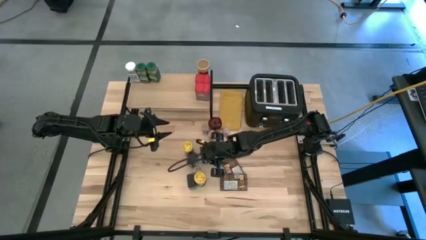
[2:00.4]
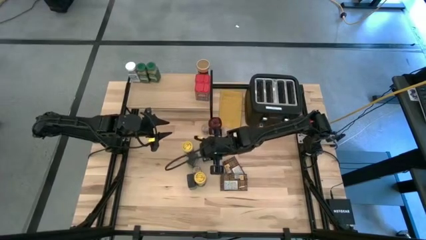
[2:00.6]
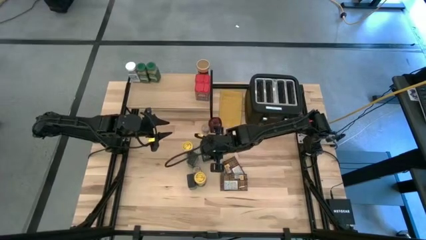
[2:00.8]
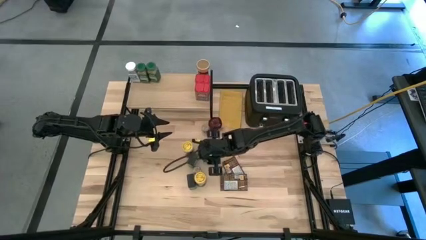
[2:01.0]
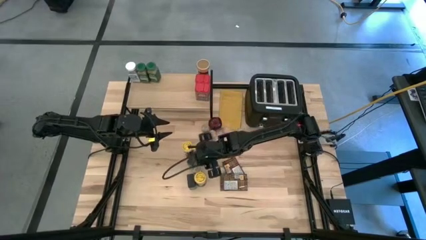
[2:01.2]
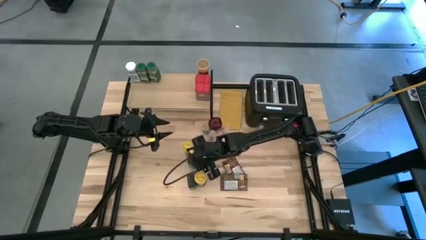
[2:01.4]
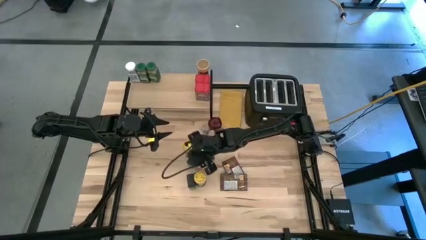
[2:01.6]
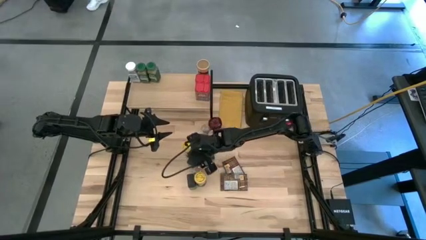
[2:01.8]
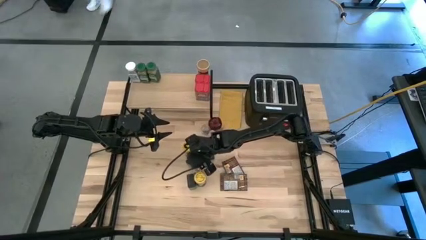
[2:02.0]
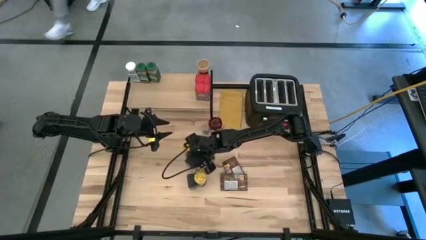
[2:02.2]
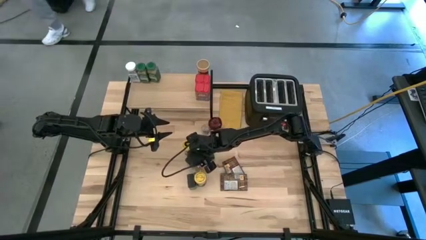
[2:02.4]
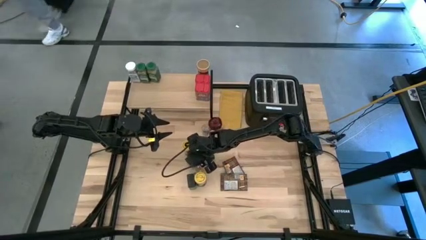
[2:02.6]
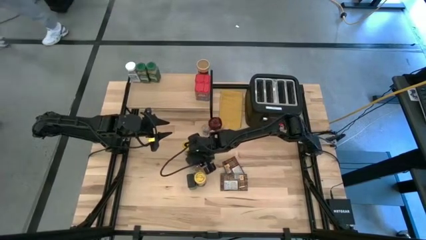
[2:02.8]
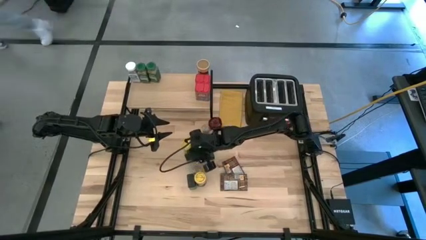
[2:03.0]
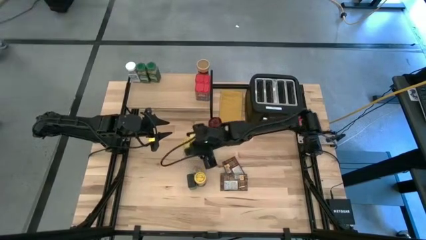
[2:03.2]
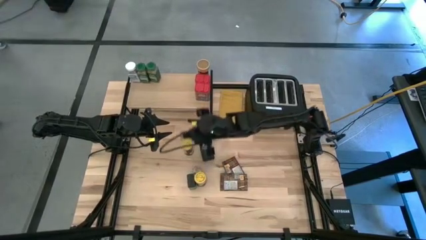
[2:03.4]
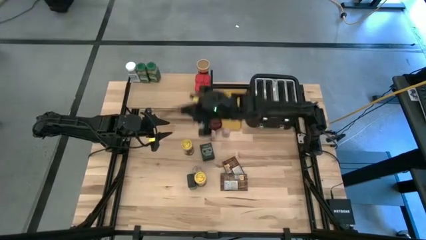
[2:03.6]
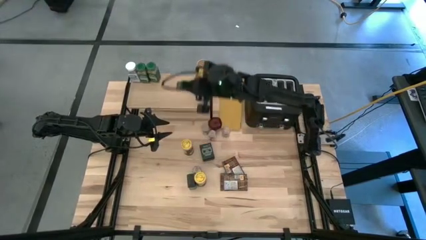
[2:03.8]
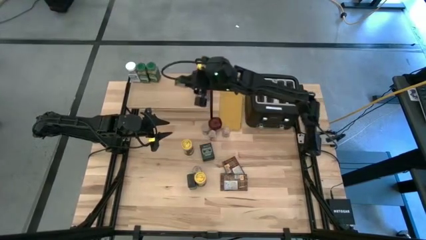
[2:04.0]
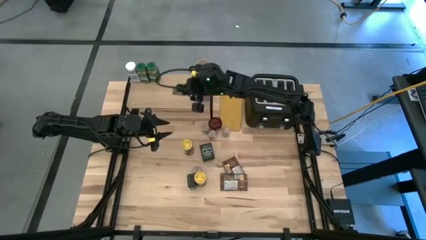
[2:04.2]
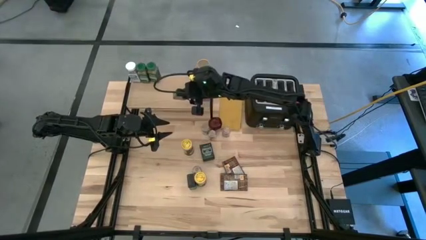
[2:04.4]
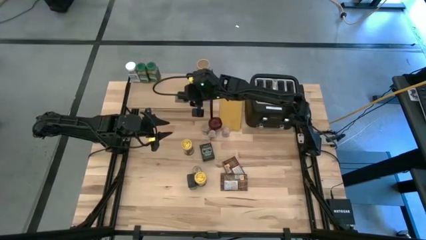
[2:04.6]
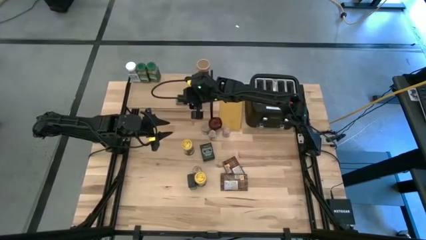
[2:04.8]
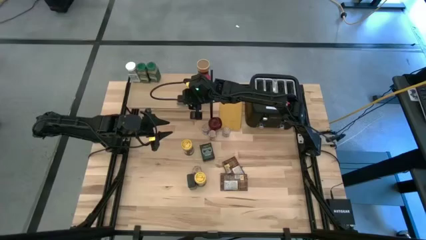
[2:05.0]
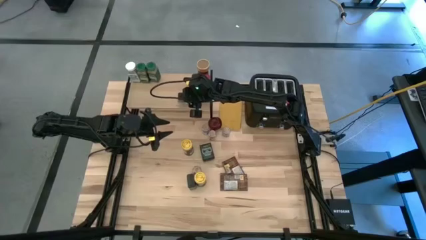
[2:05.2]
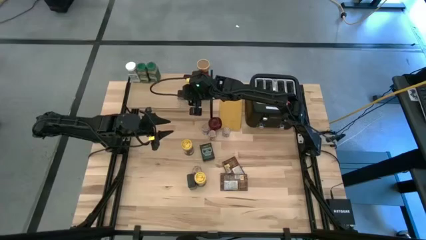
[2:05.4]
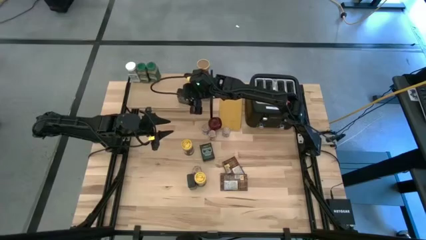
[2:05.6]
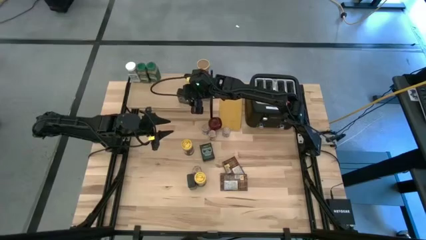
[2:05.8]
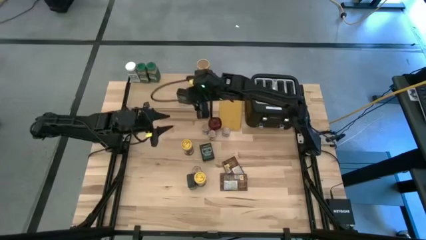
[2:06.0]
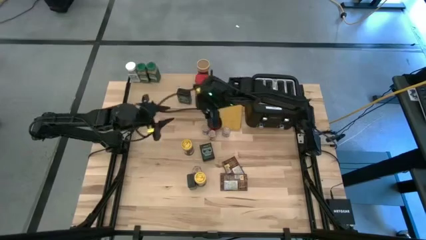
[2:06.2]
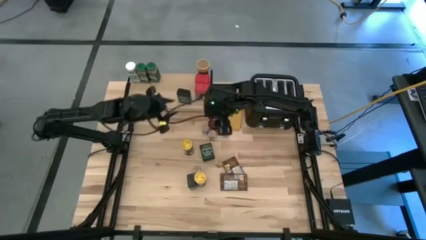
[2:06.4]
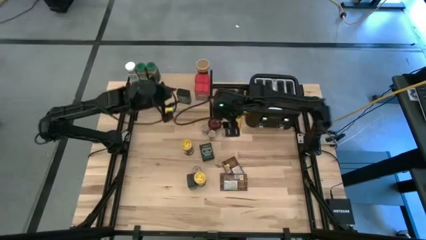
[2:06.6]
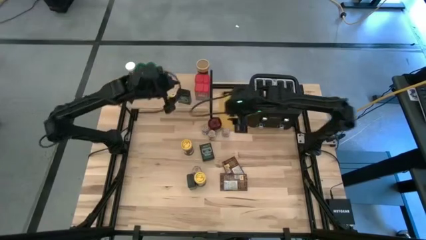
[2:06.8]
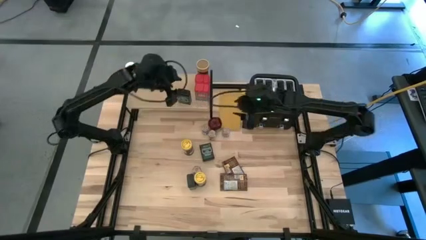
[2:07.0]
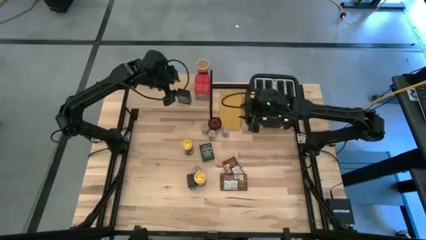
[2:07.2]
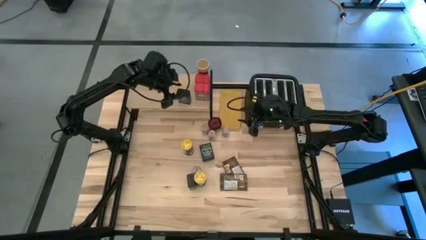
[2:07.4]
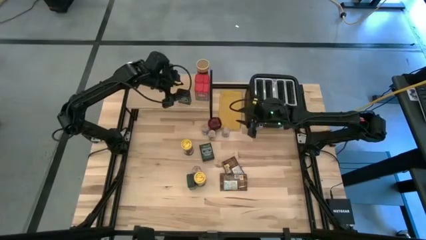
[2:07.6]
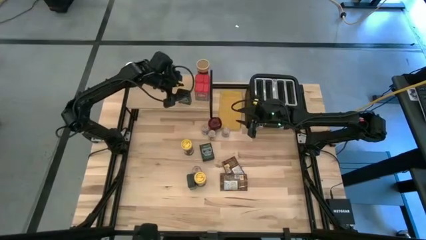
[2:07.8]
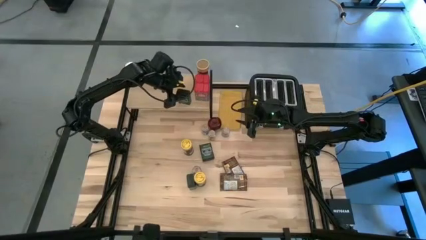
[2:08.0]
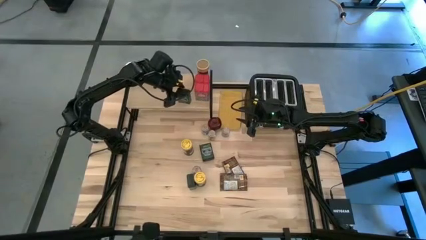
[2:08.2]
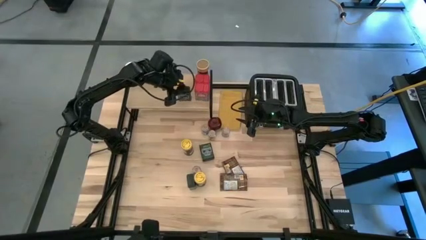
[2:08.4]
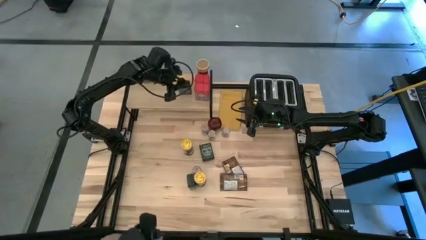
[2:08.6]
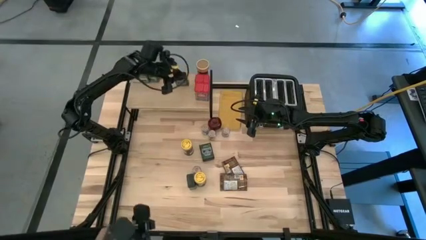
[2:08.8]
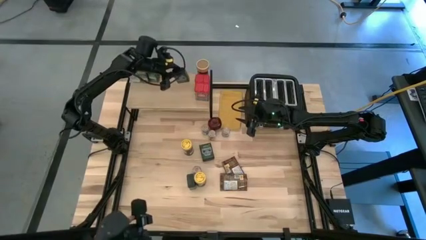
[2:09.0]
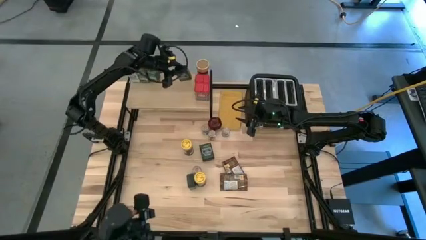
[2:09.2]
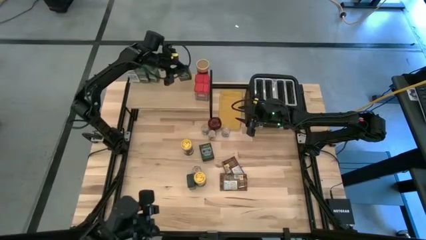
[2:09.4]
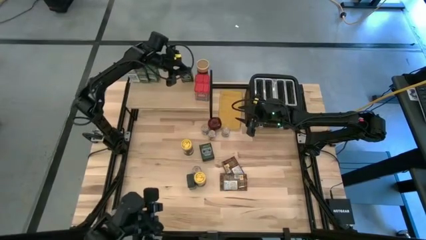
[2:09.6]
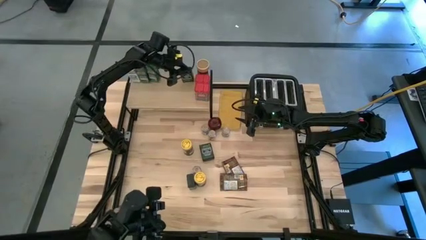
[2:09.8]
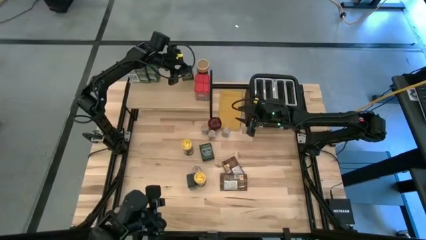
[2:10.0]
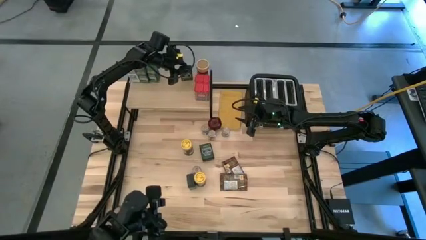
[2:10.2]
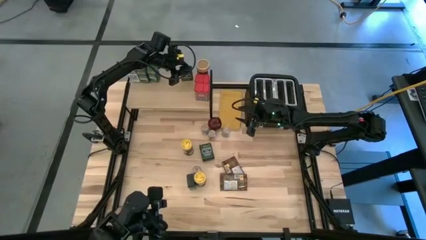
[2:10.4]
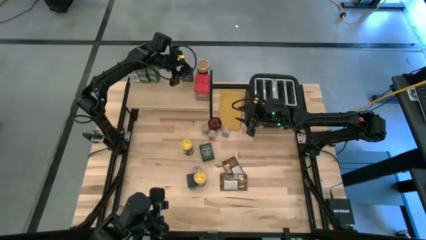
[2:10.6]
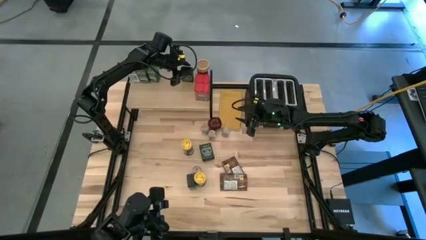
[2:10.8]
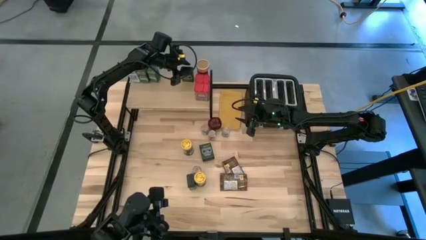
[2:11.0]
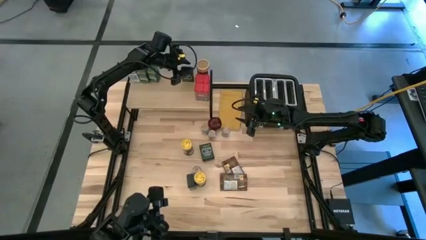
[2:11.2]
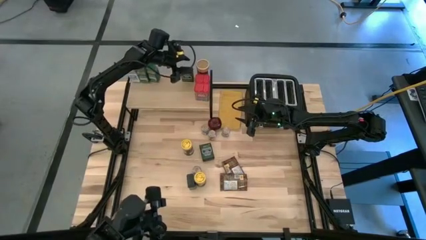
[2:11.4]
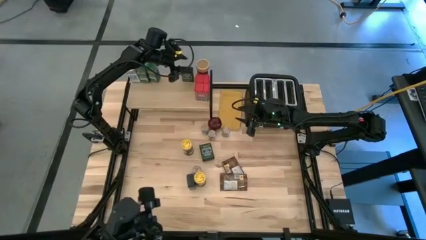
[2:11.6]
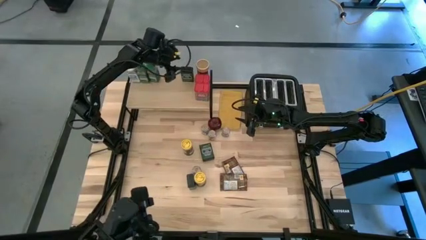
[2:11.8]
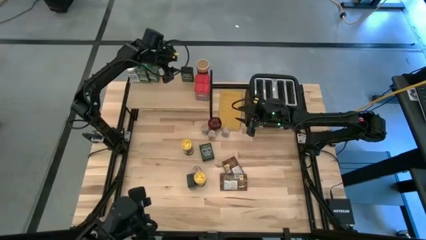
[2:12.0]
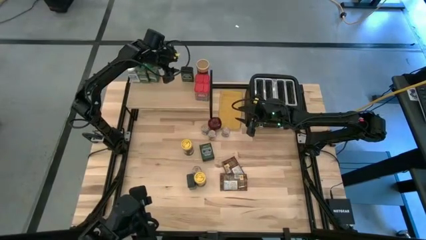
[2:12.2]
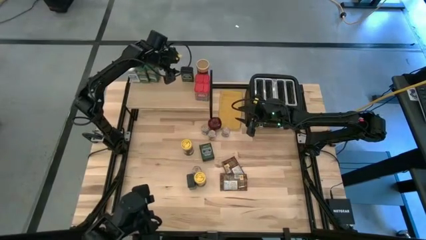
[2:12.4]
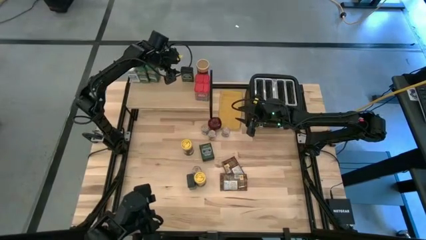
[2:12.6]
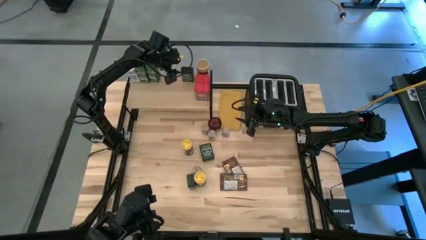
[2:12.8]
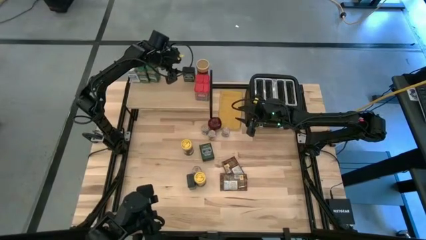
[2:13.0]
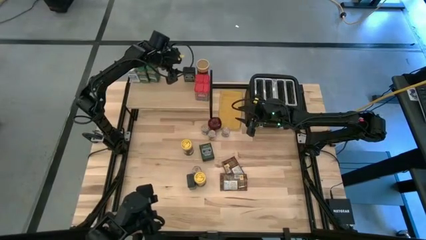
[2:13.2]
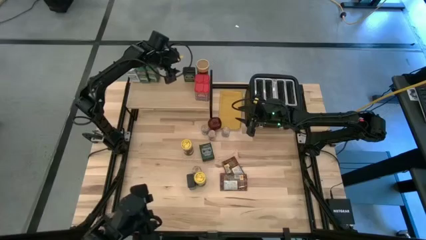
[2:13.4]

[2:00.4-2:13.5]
Task: Shelf spices
Put the center black seasoning can on the shelf

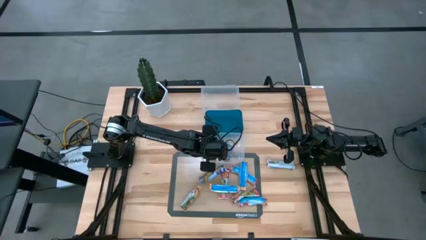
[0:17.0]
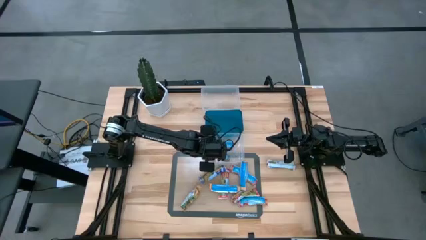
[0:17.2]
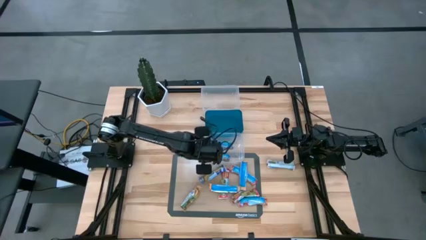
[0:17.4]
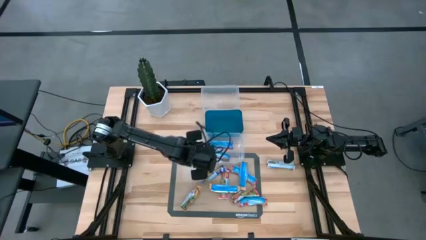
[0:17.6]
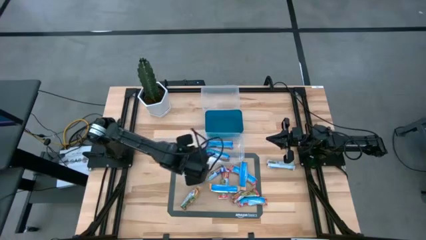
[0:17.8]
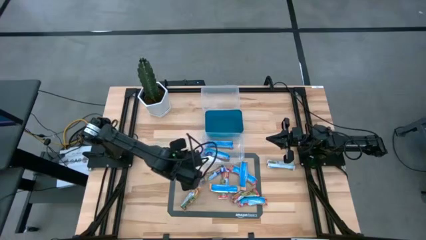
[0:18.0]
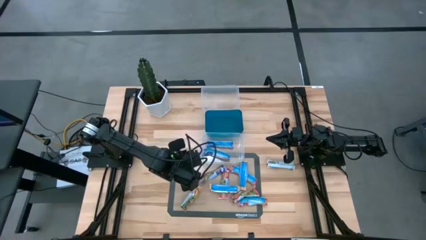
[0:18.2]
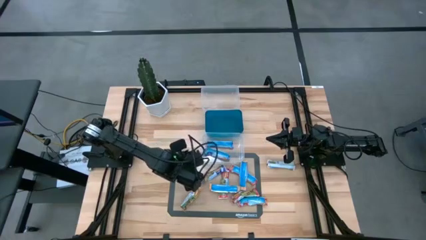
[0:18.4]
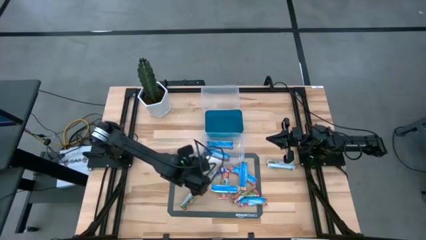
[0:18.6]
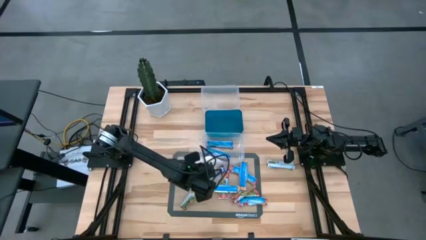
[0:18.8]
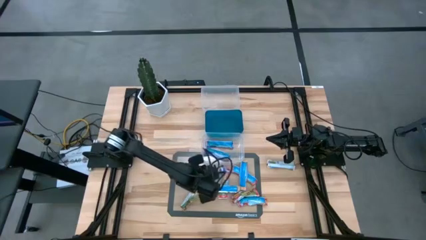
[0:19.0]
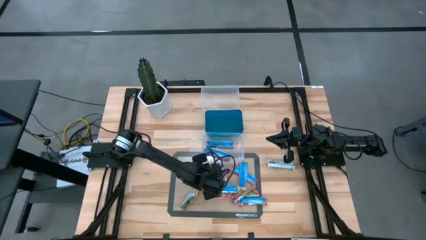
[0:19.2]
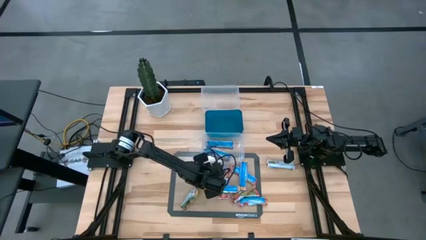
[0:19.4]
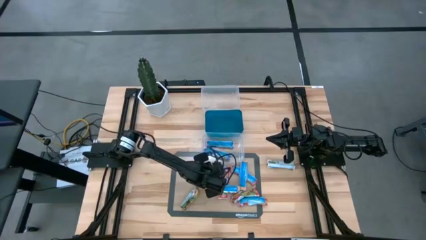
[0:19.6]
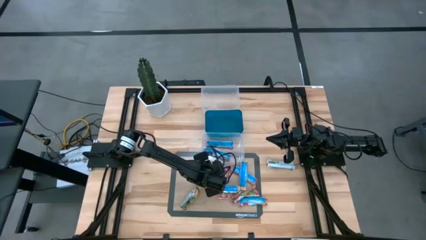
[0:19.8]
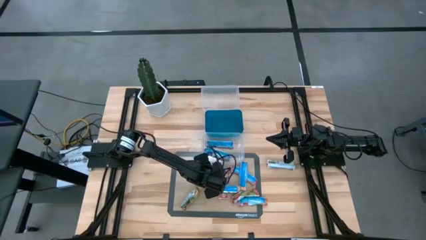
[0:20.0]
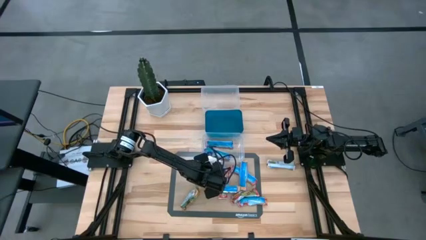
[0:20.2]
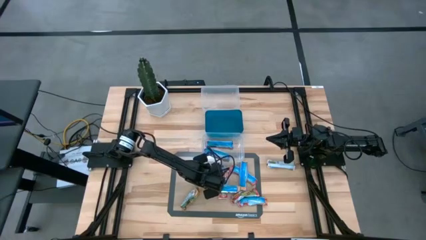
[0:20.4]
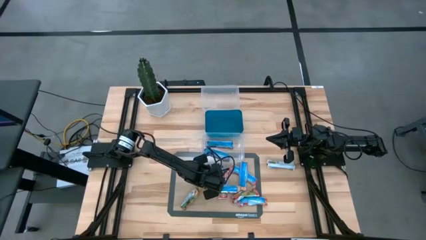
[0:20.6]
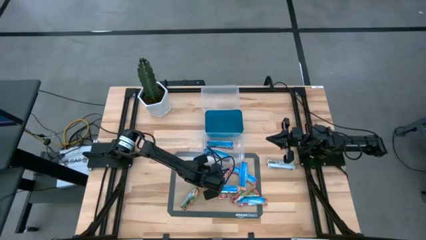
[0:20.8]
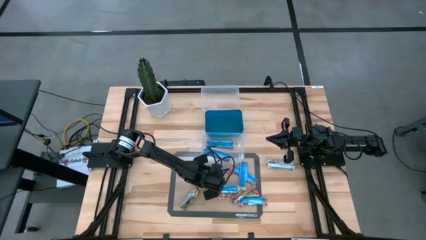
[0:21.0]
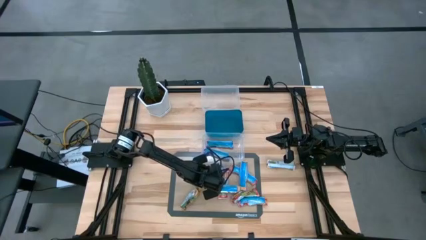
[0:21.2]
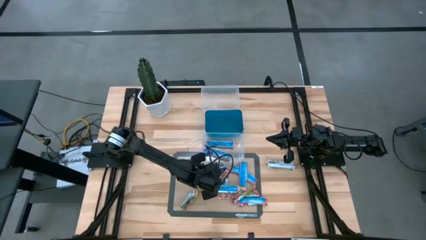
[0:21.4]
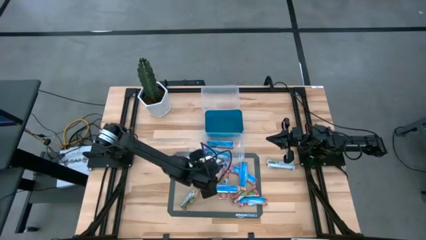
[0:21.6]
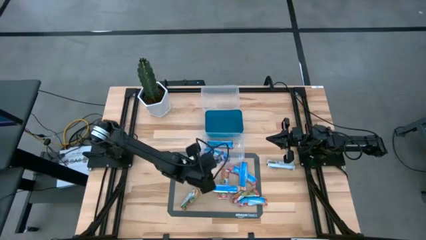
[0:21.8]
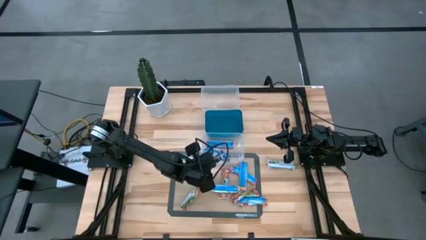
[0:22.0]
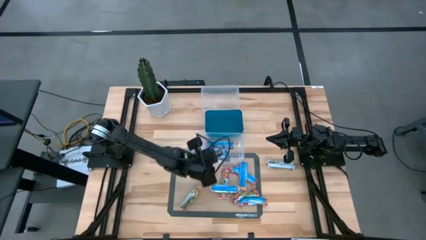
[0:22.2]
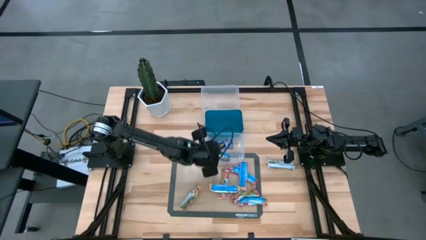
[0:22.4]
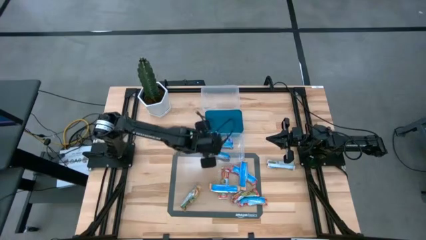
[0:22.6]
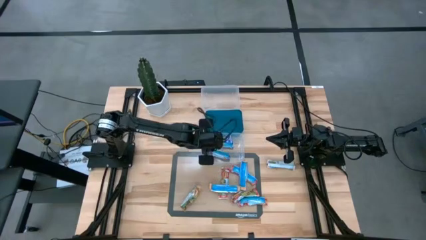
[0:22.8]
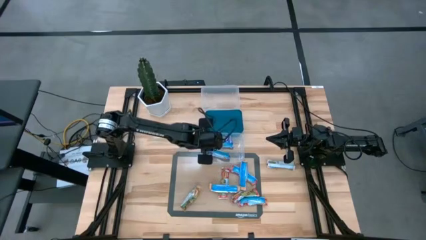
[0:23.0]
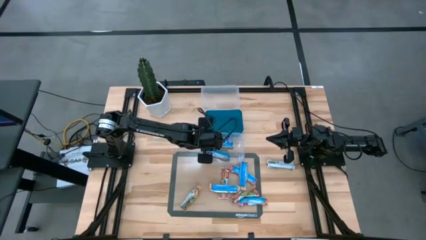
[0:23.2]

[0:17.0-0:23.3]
Task: Pick and place Granola Bars by type
Put the blue granola bar into the bottom transparent bin
